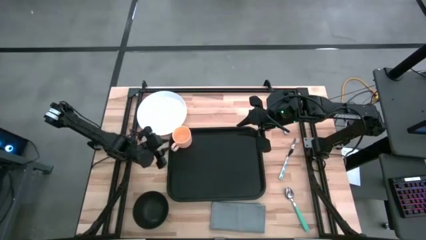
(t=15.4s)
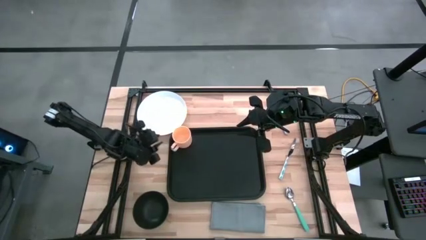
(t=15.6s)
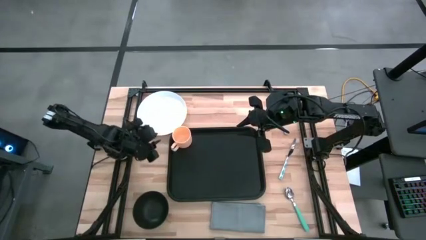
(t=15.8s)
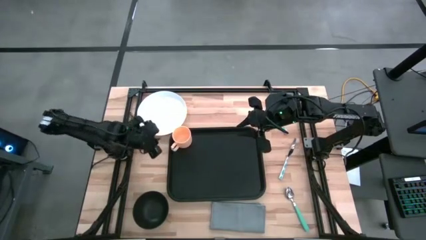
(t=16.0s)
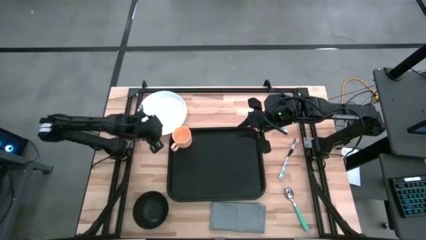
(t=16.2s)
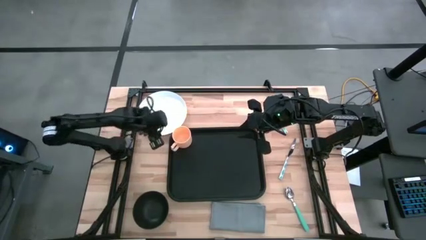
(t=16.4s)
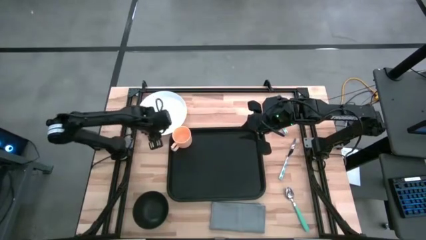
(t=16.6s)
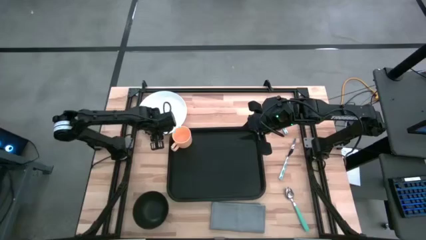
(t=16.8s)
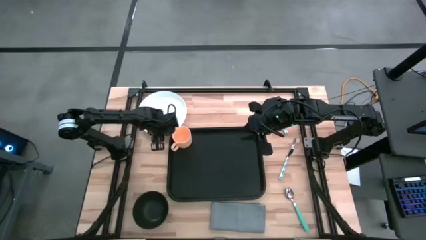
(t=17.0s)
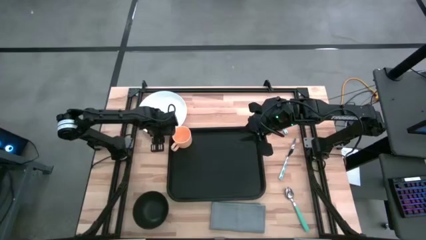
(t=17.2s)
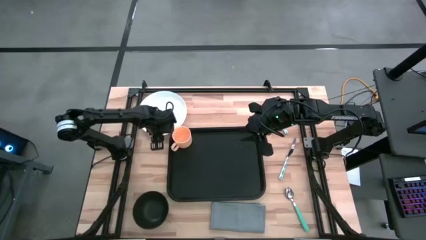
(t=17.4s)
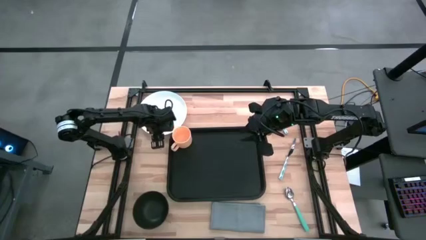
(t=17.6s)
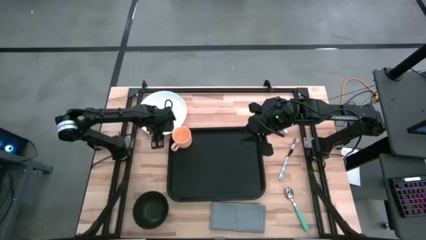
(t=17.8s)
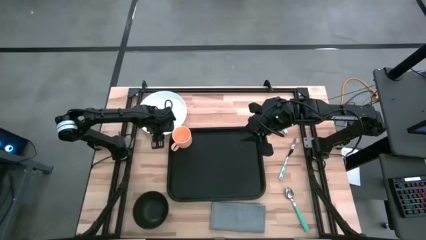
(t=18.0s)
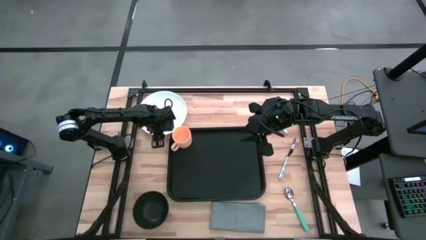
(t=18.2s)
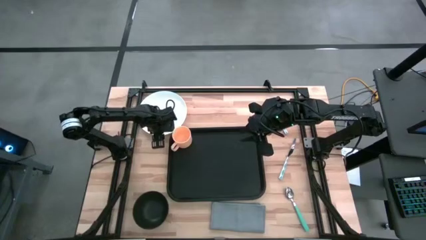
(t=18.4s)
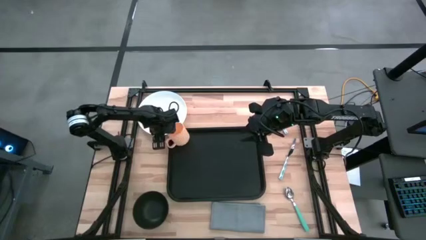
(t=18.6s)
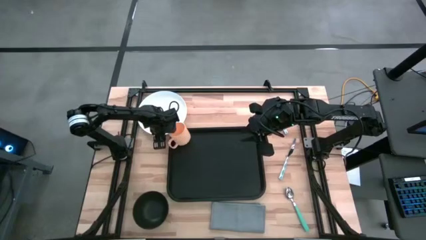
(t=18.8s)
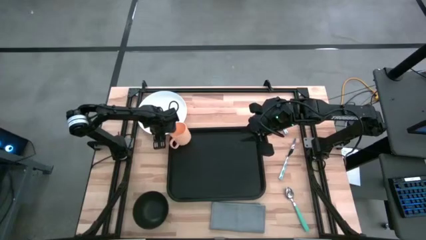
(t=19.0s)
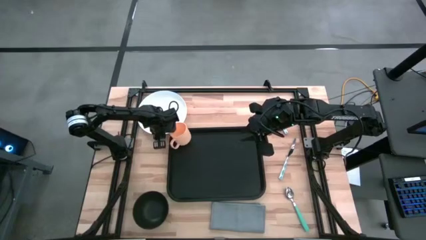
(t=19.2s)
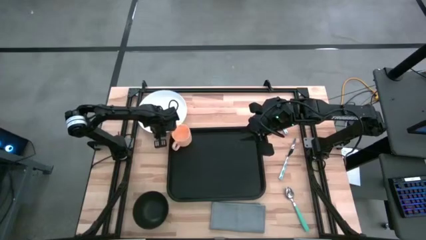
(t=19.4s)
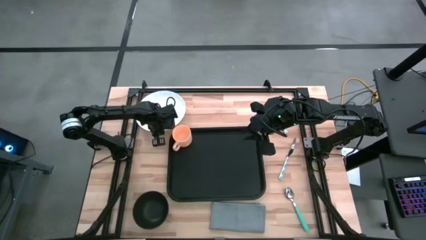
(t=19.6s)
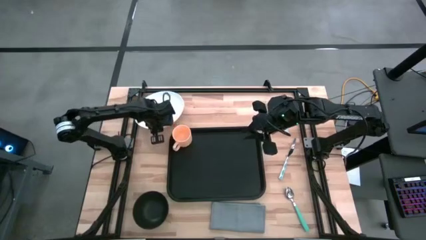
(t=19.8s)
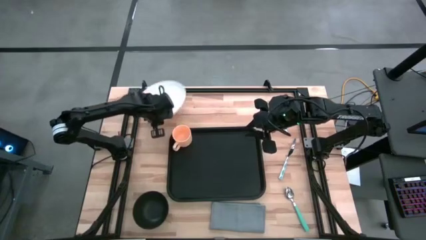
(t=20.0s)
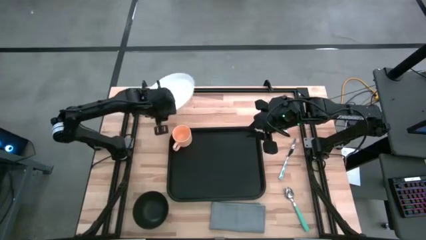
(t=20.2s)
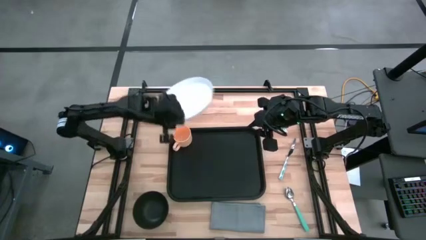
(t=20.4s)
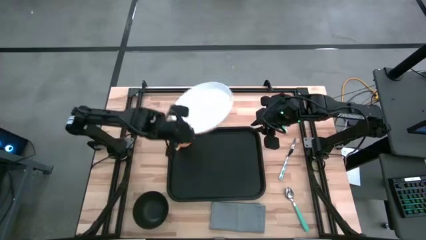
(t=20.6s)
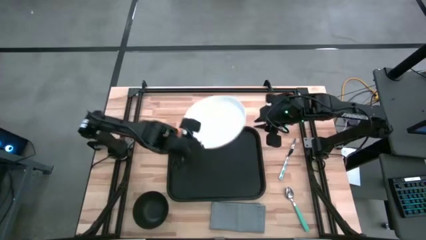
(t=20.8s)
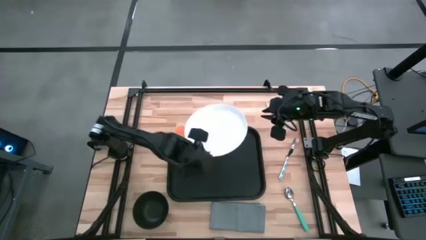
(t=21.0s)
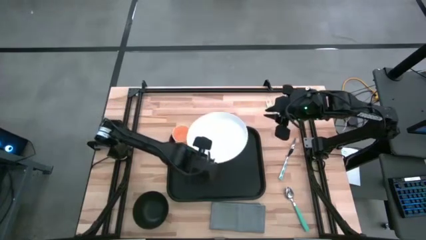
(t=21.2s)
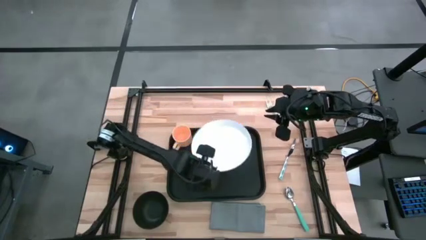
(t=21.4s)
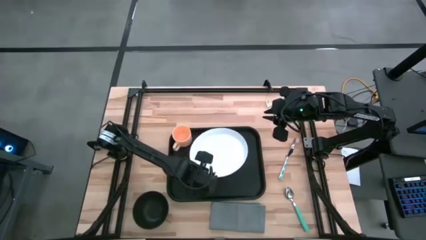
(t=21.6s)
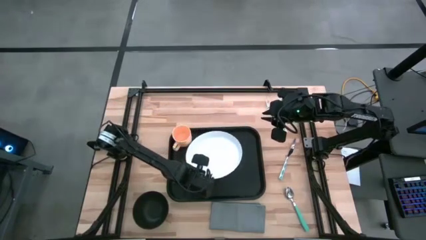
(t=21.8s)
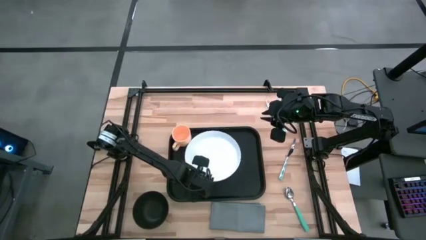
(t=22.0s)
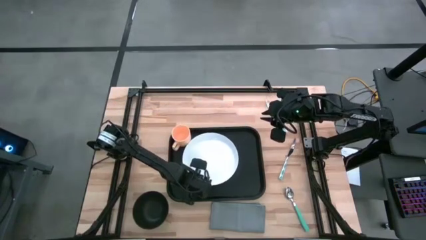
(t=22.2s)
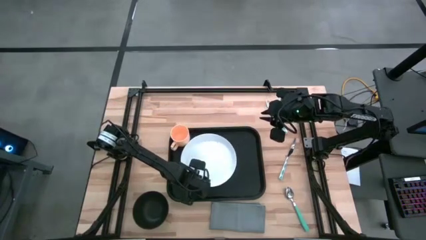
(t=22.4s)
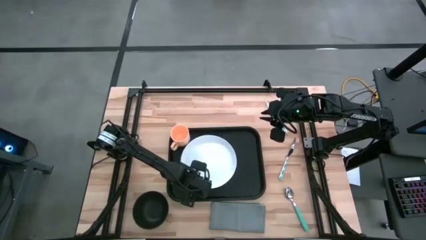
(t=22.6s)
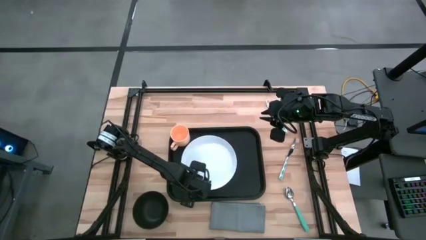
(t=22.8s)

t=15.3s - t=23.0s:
Task: Set up tray
Put the white plate on the serving tray

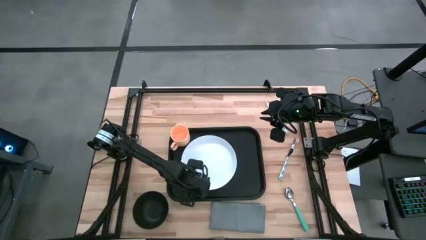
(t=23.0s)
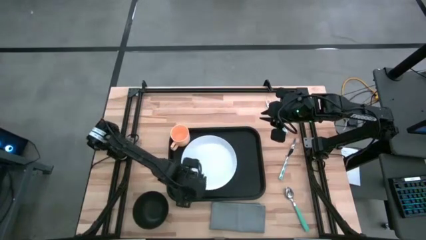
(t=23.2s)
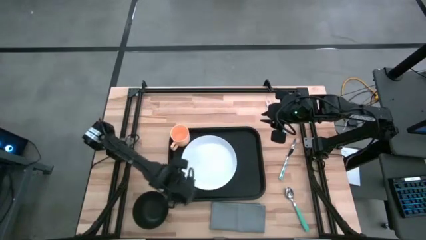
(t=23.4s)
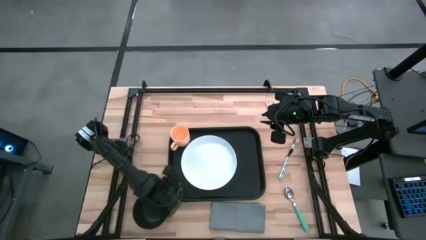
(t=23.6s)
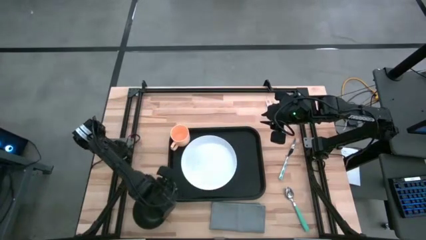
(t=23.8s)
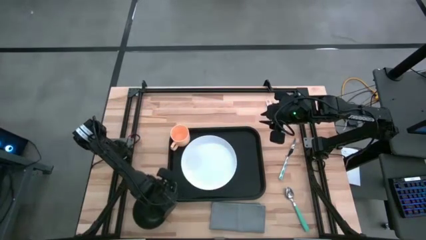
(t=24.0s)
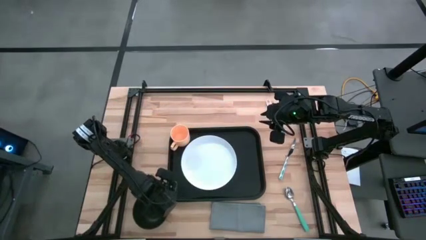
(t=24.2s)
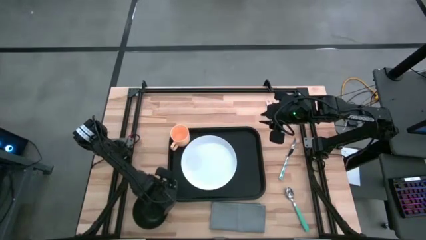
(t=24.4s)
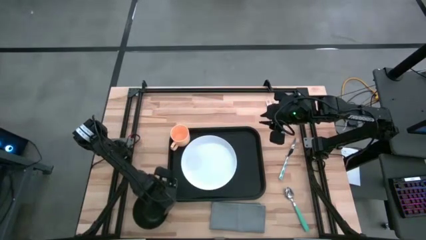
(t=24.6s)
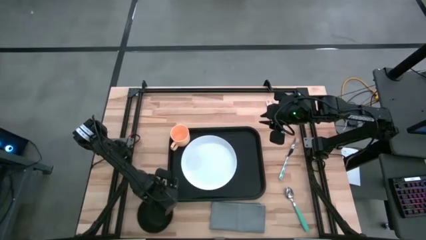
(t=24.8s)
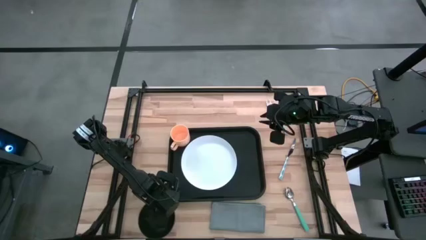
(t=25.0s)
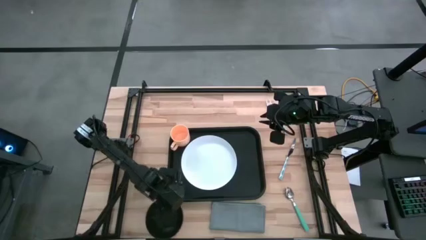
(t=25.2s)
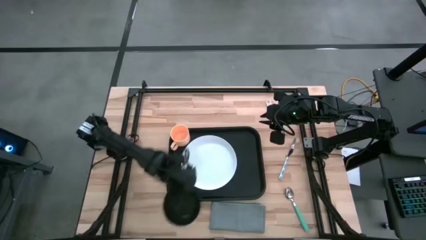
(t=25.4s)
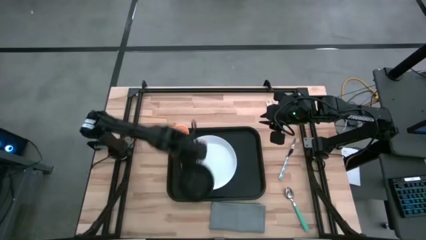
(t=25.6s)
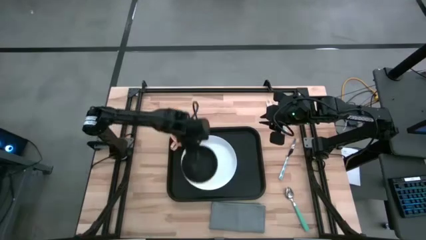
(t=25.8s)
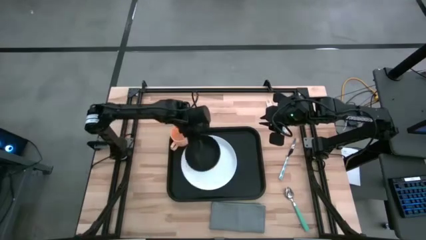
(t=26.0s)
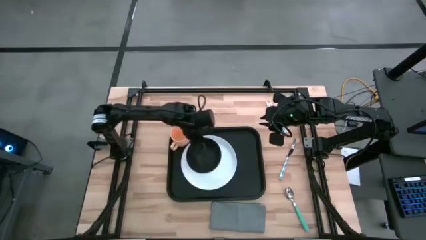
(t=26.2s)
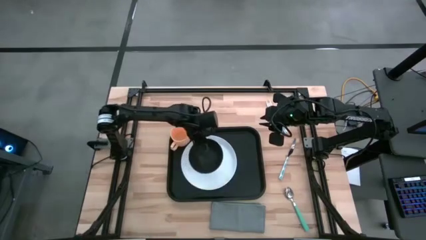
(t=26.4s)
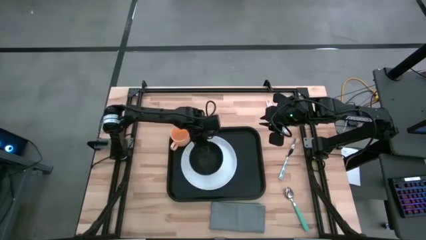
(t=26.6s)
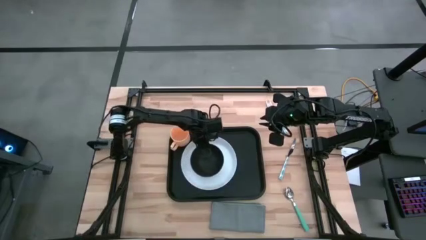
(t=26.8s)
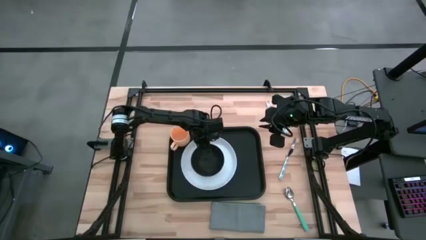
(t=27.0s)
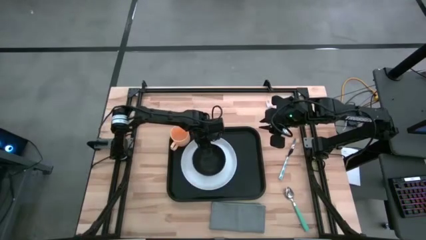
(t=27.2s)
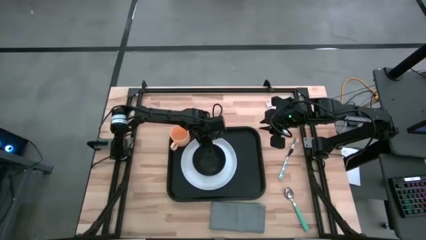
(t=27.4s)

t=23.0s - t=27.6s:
Put the black bowl on the plate
